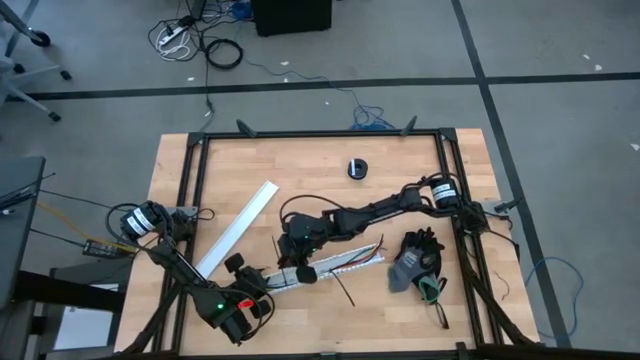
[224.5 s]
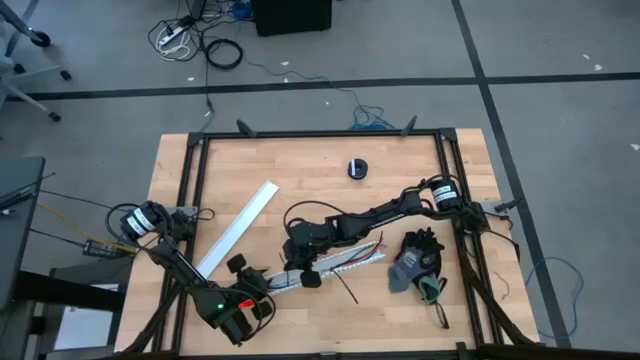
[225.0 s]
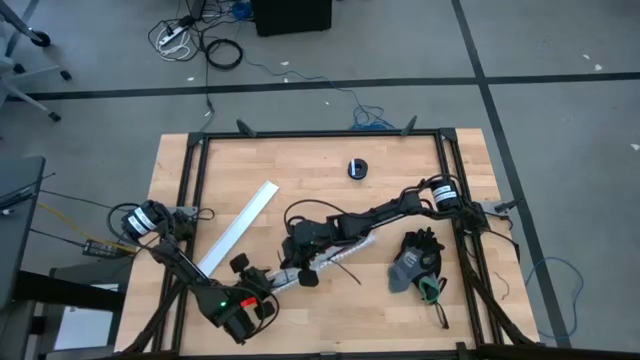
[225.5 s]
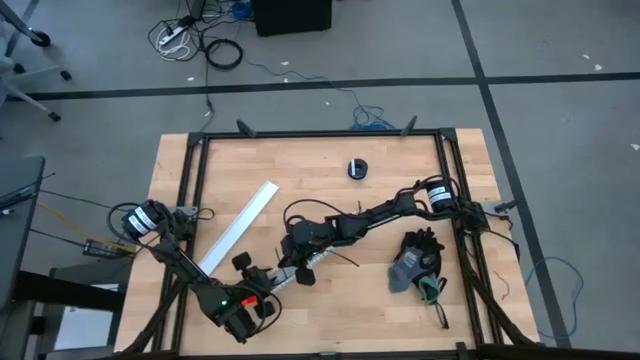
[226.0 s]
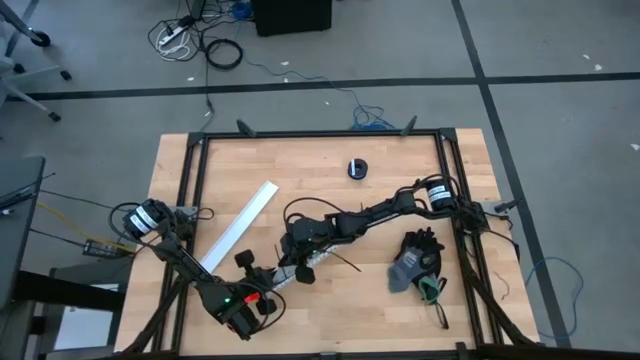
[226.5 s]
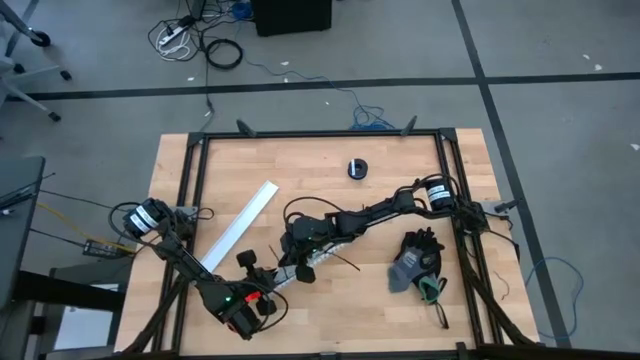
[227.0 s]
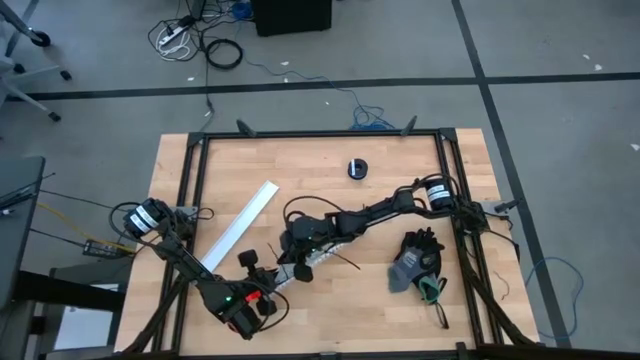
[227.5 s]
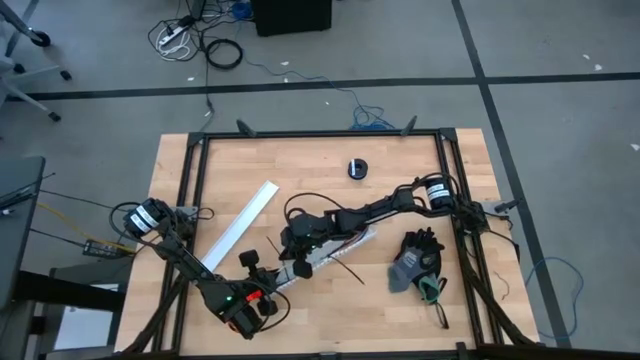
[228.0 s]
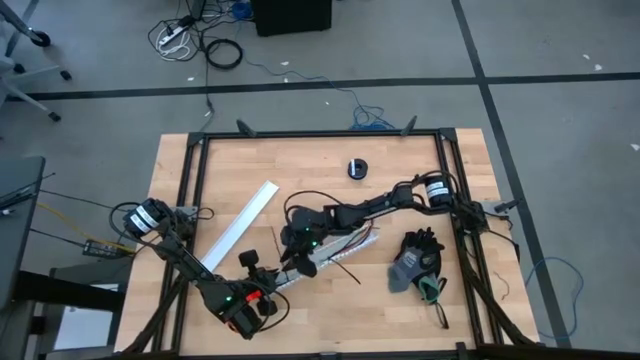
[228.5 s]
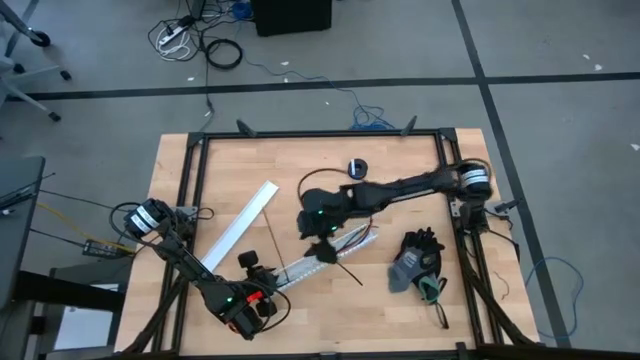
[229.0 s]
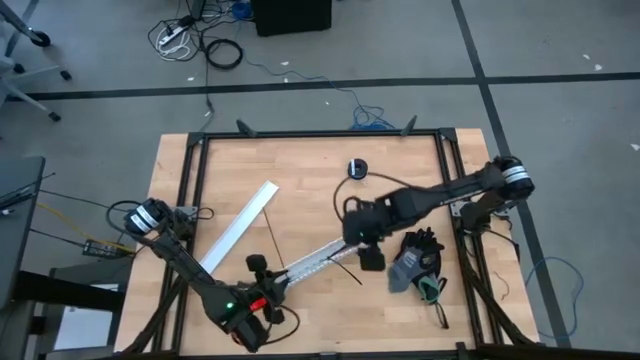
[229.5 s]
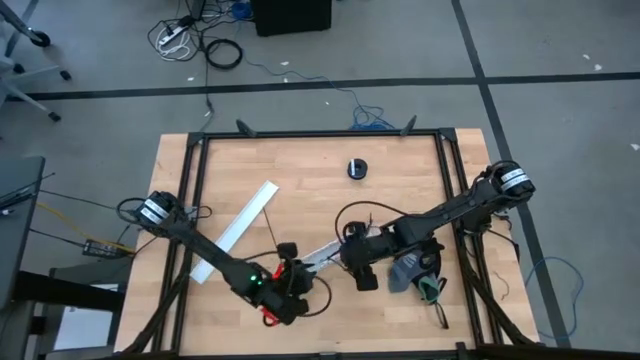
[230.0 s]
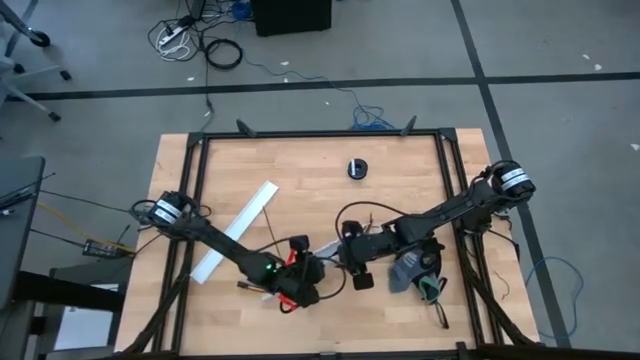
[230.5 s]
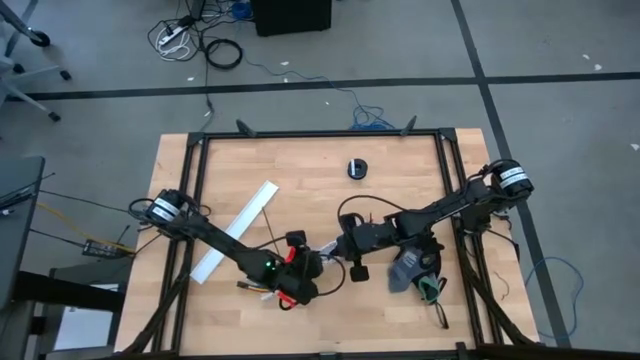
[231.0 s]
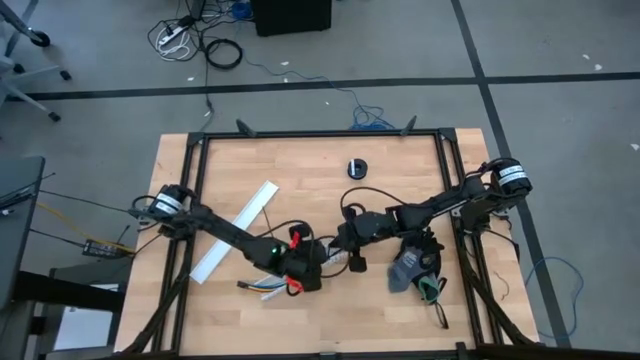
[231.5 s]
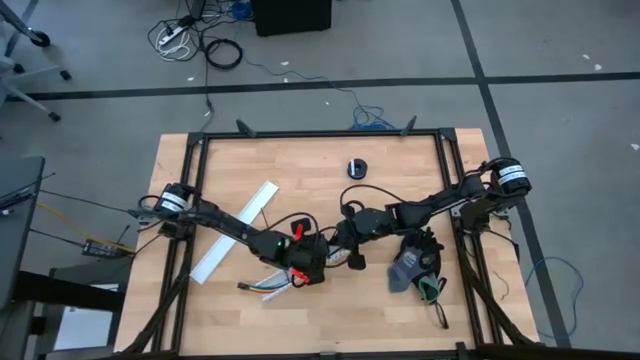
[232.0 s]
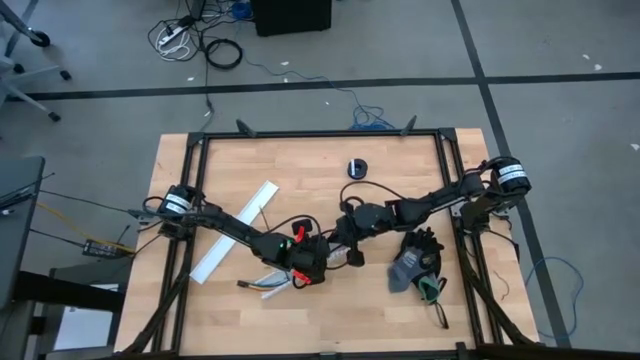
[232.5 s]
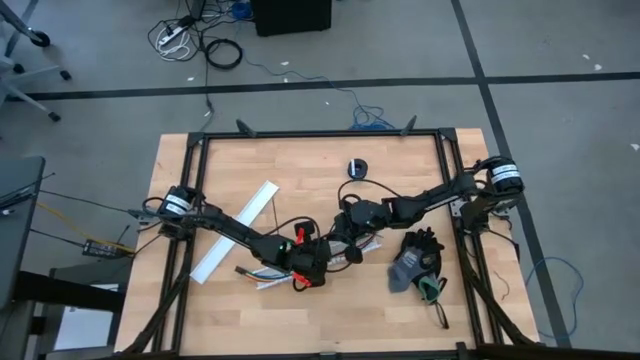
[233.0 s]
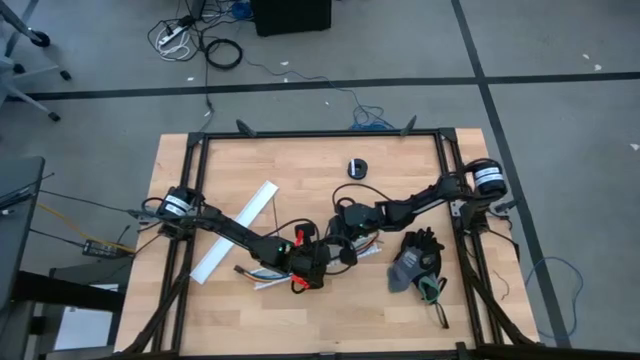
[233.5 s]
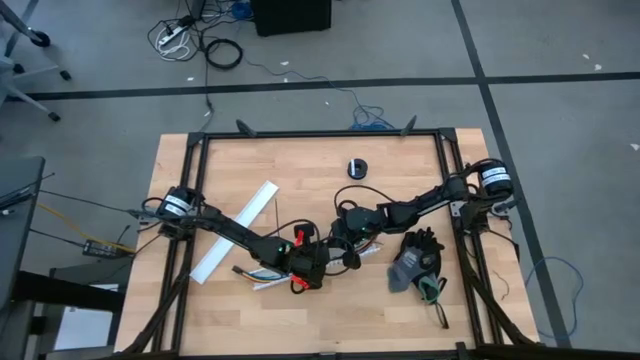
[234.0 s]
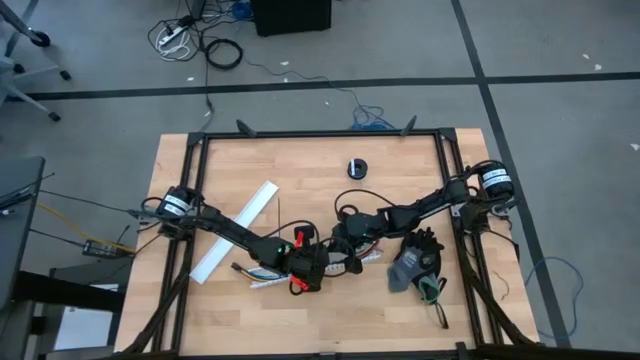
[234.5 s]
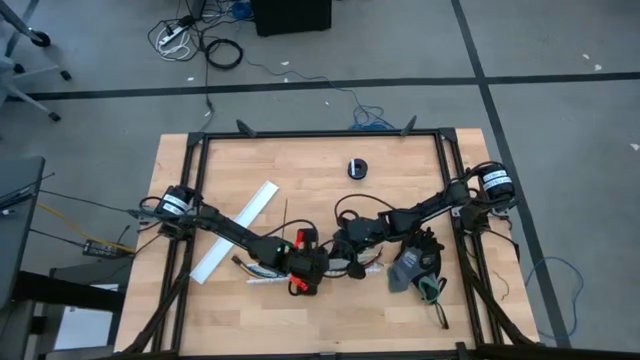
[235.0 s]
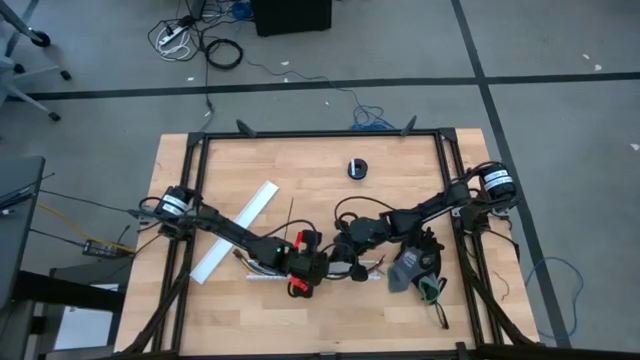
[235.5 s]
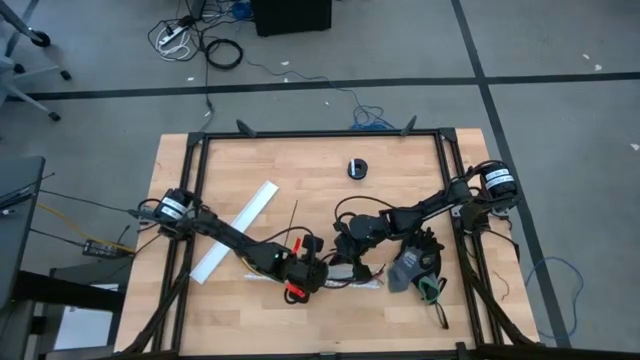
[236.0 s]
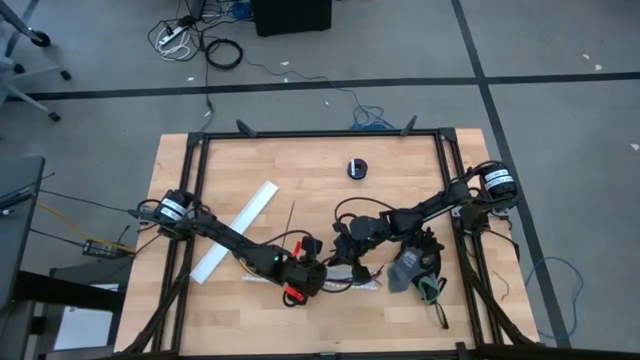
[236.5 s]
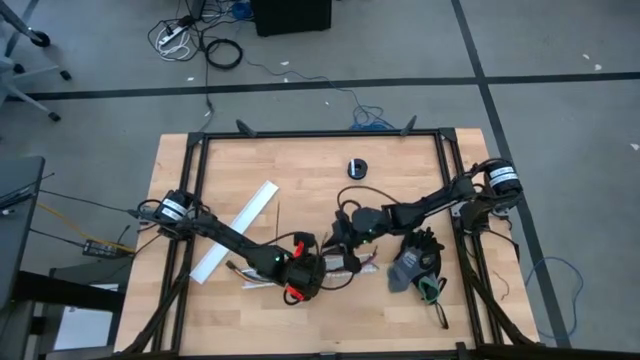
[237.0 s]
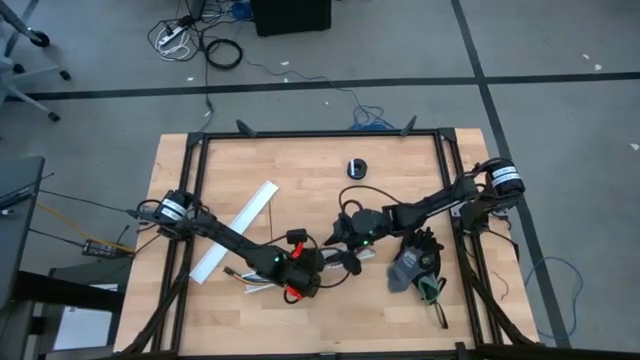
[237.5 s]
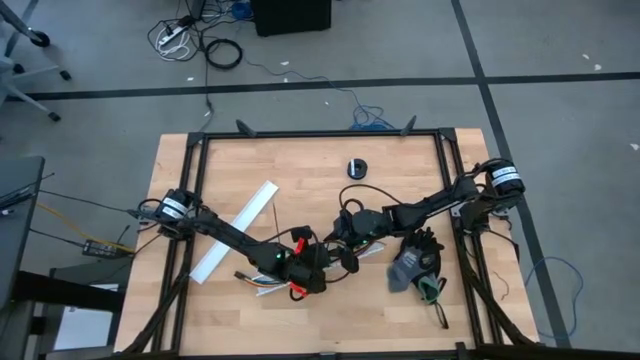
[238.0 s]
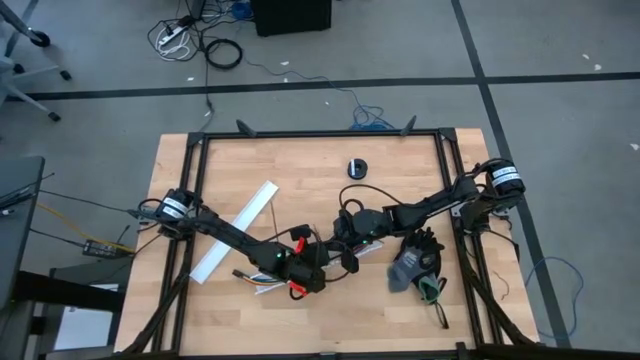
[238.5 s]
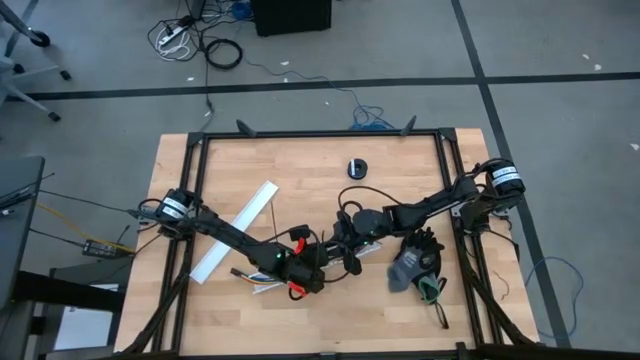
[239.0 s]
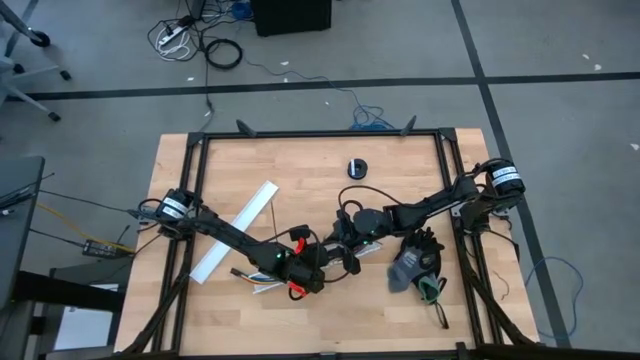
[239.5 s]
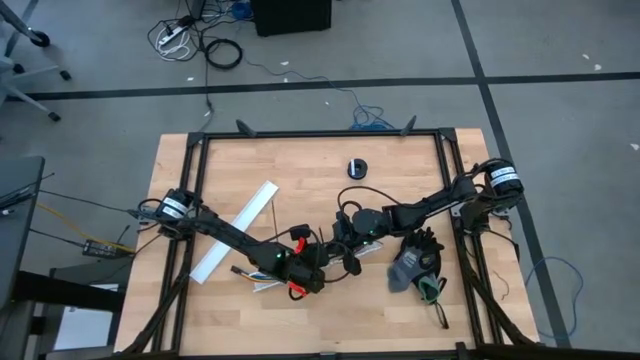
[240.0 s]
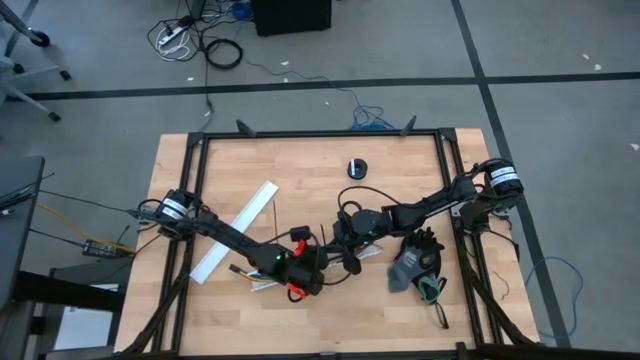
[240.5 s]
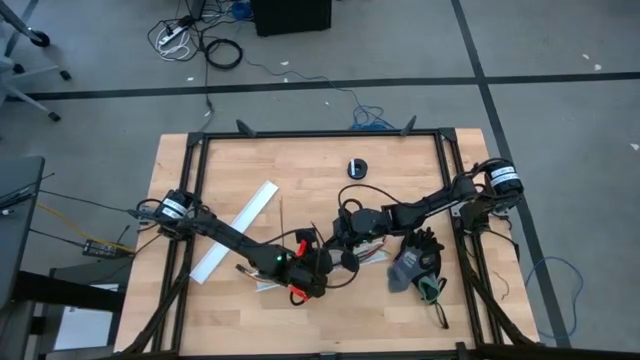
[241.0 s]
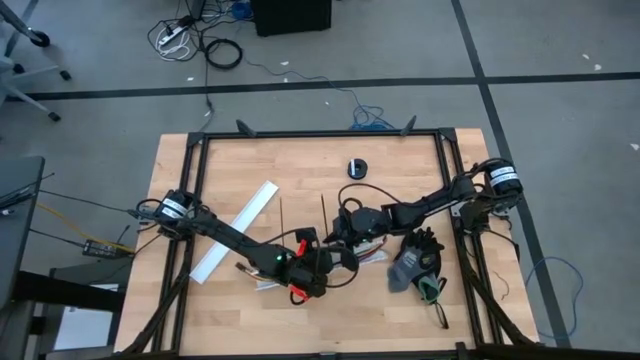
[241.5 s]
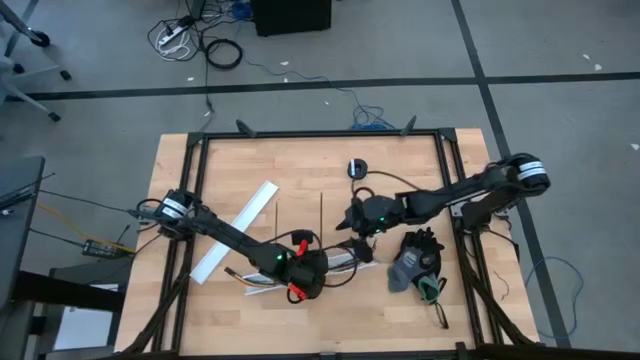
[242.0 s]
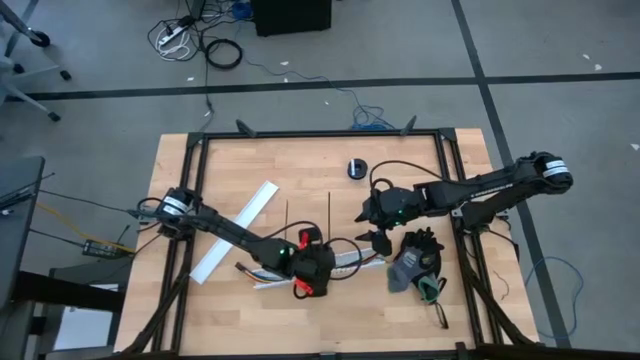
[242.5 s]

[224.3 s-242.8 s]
Task: Ziptie cables
Put the cable wires in the white cable duct
